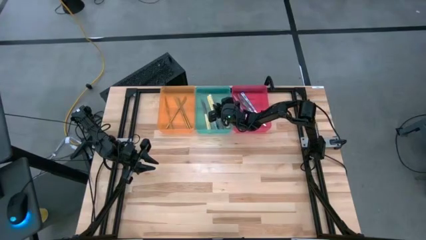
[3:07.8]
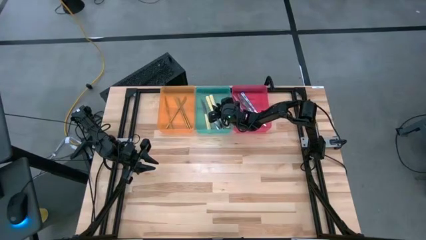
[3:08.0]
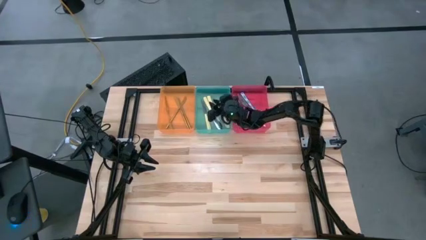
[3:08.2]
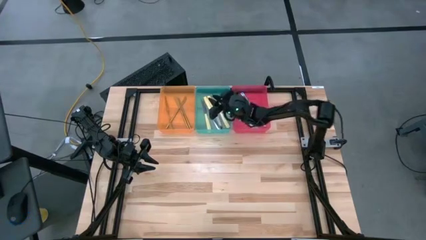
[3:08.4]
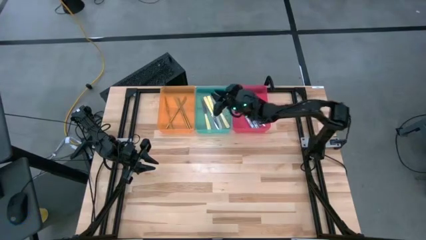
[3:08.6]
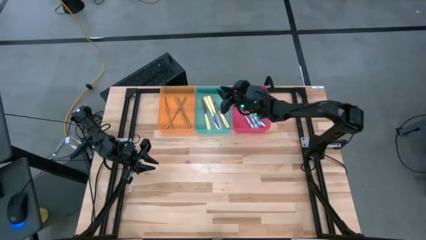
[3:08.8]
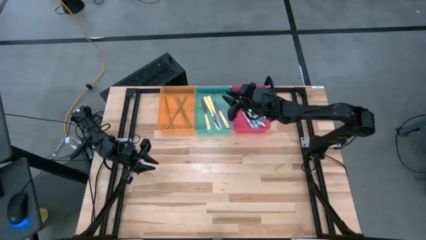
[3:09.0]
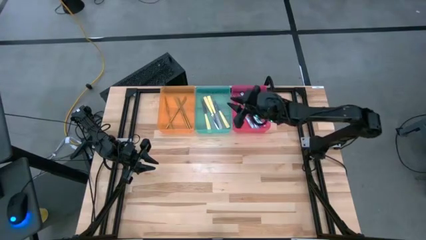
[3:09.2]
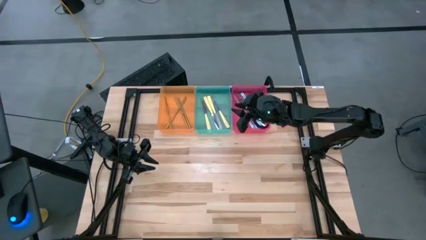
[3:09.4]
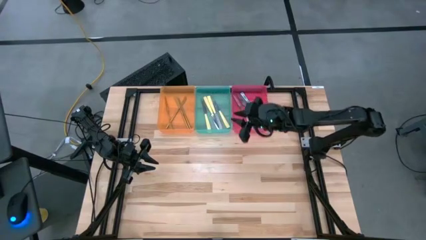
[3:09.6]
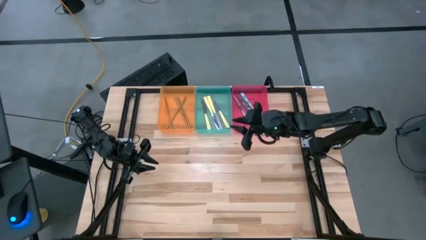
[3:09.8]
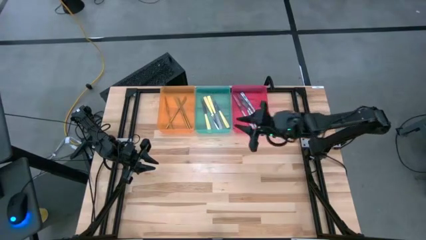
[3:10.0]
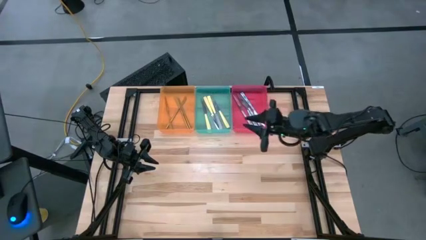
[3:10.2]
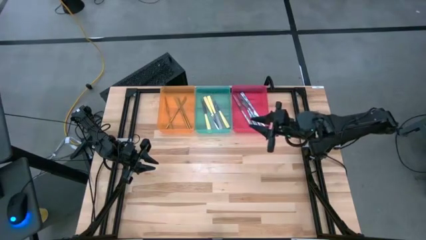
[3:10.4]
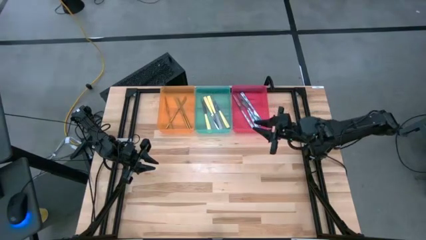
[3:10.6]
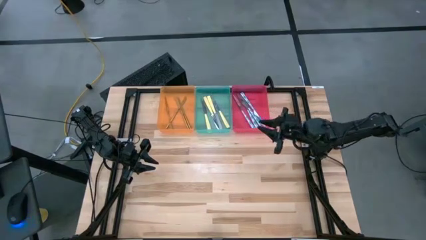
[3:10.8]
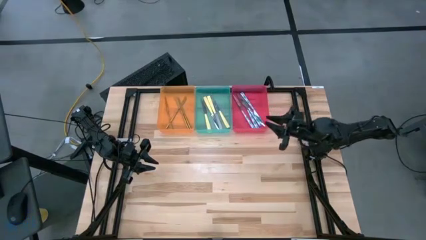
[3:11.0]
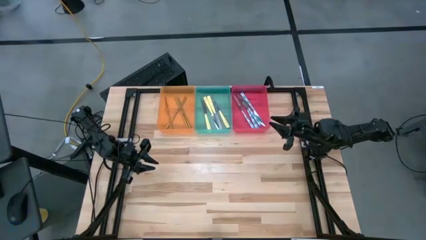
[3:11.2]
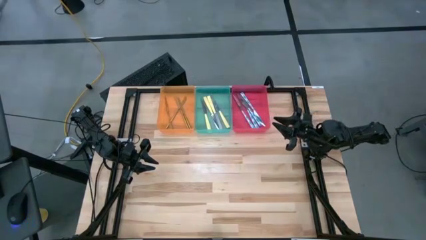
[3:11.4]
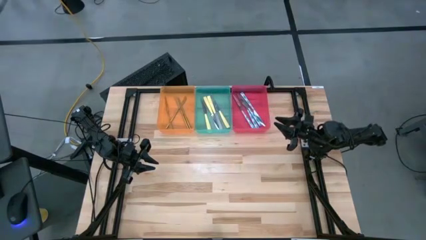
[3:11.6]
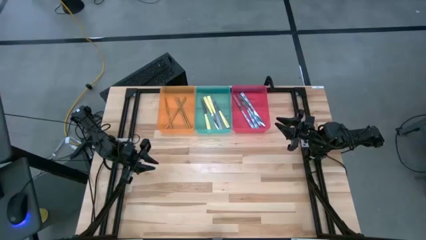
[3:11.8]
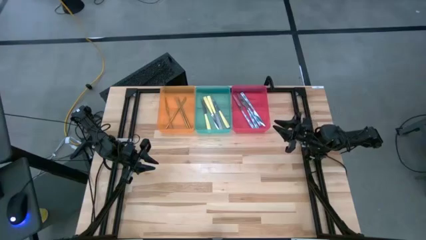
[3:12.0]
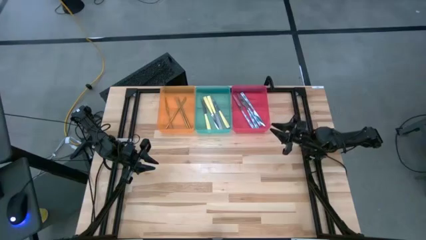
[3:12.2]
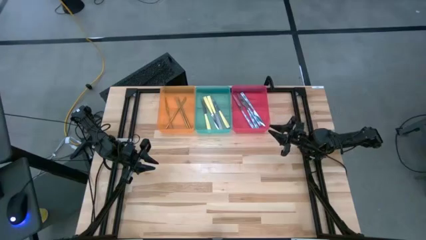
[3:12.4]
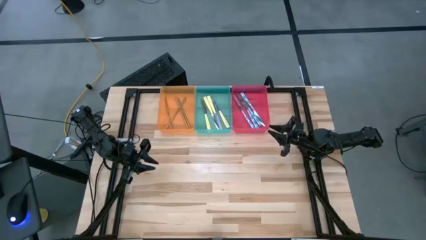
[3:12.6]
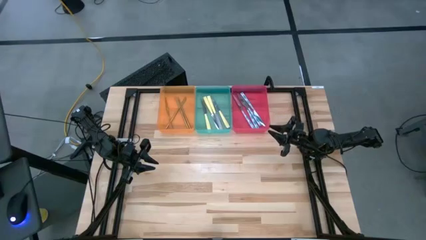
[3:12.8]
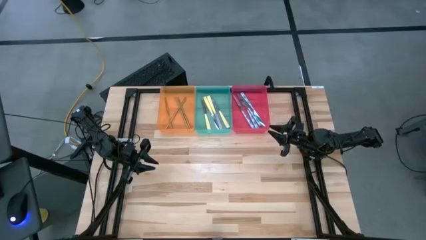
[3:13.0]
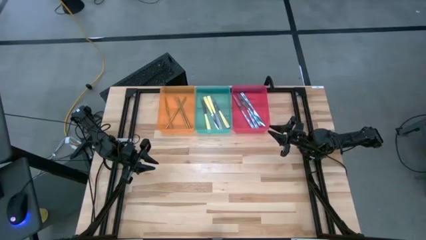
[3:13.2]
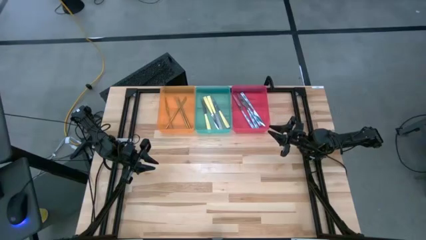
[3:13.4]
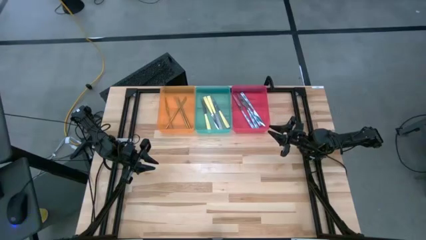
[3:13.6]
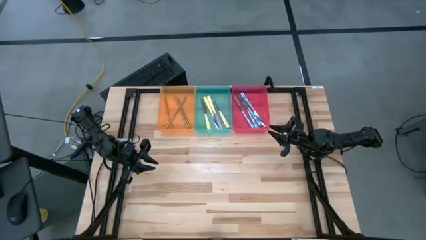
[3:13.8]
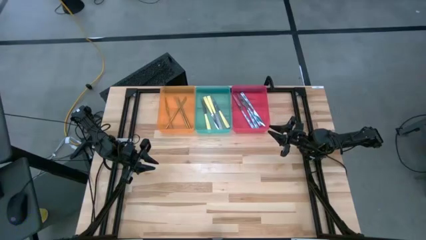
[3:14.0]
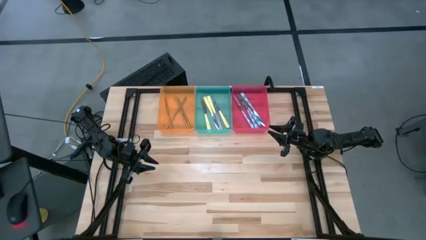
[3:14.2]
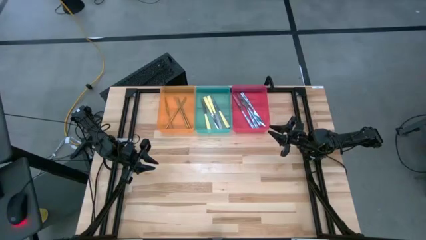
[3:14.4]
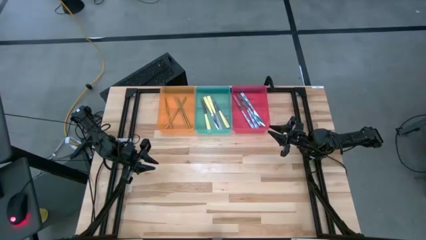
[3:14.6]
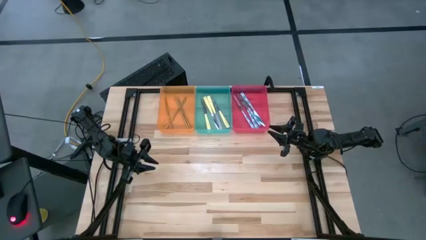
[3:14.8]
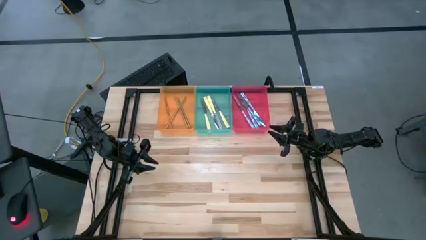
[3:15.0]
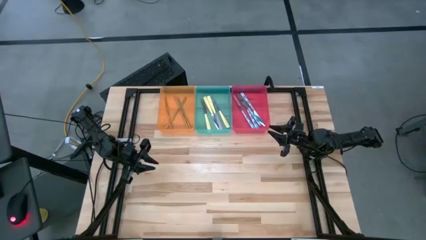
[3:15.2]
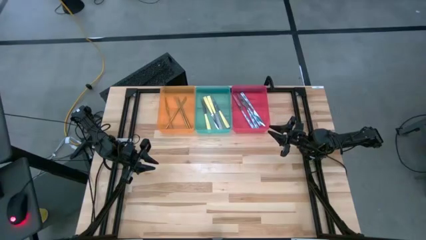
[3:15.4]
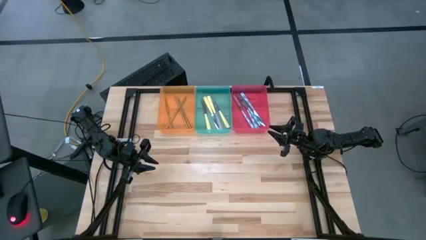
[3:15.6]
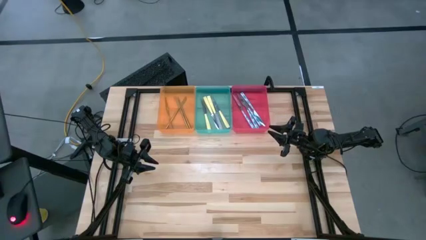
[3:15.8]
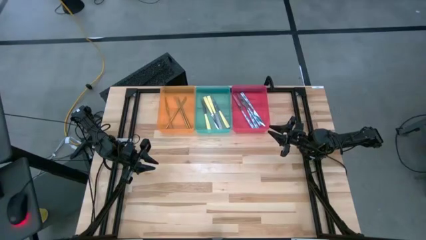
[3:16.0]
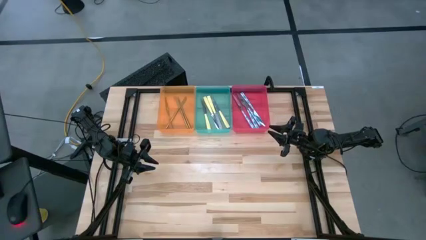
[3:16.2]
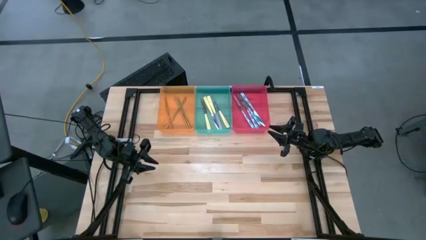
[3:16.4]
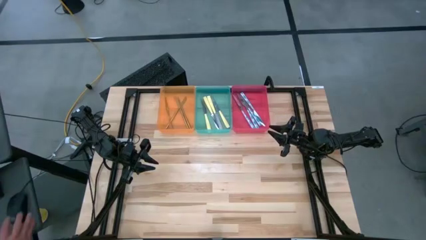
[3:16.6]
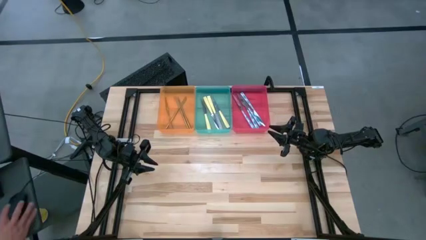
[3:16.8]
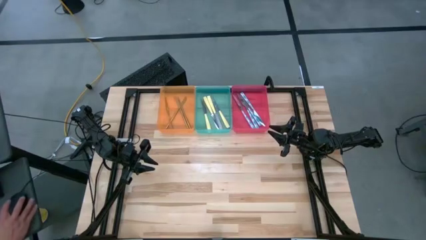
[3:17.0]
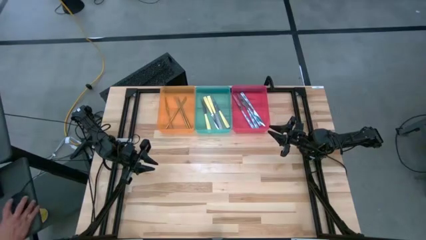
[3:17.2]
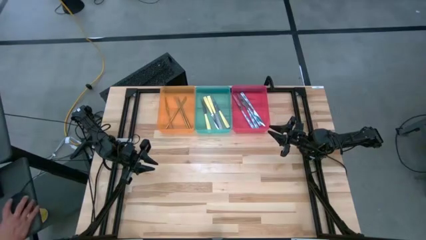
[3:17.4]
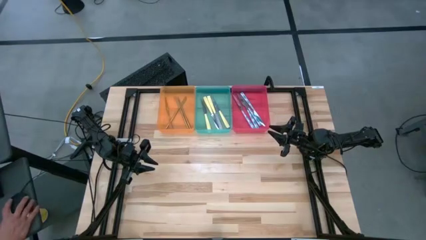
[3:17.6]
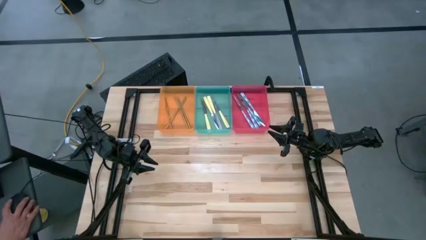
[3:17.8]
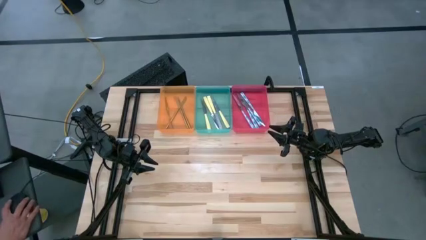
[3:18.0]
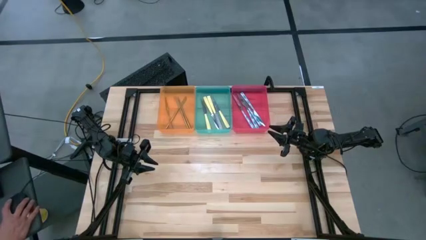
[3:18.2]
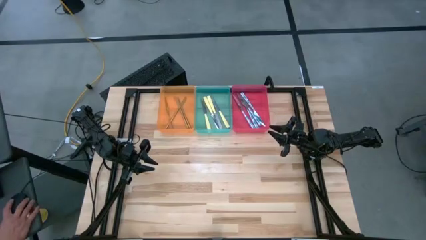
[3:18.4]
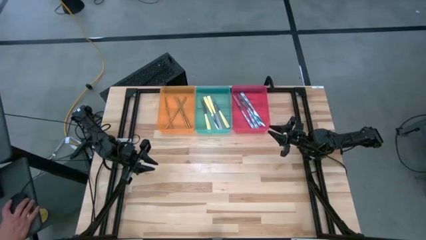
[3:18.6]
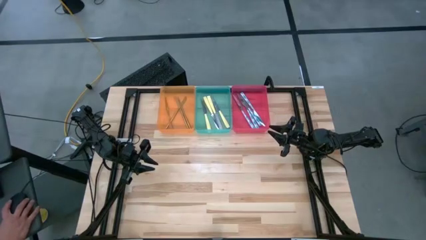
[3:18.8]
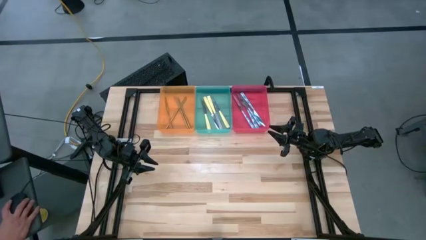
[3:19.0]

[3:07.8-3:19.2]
Task: Sort silverware by color (type)
Return to Home Position

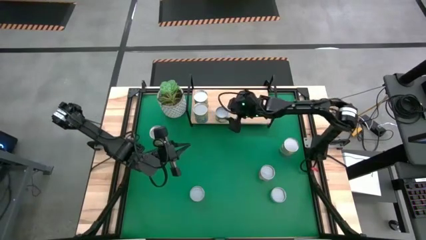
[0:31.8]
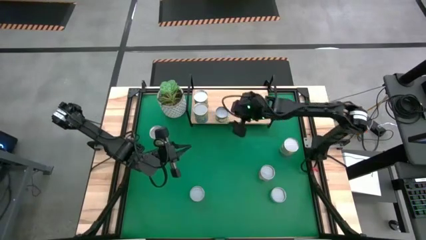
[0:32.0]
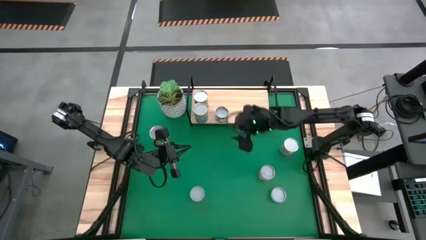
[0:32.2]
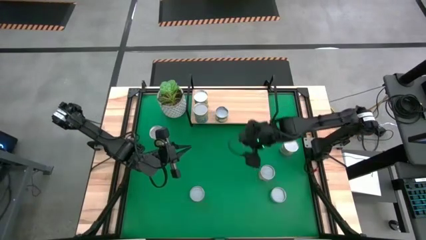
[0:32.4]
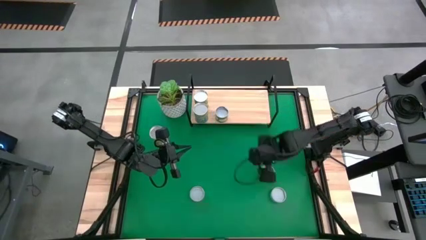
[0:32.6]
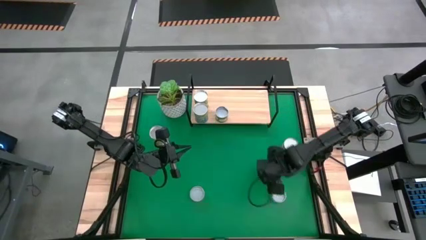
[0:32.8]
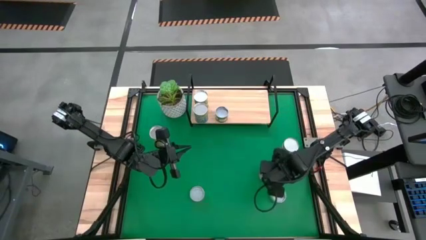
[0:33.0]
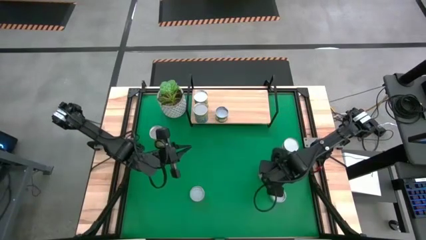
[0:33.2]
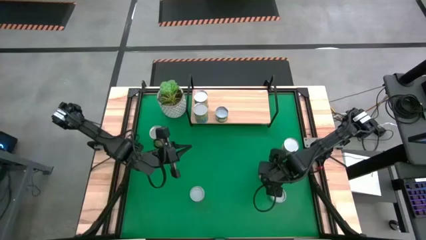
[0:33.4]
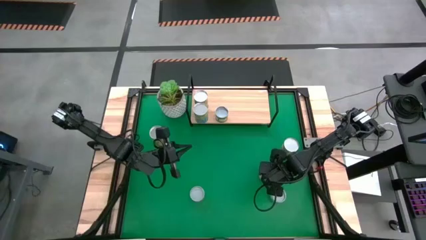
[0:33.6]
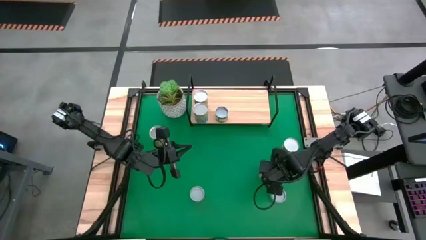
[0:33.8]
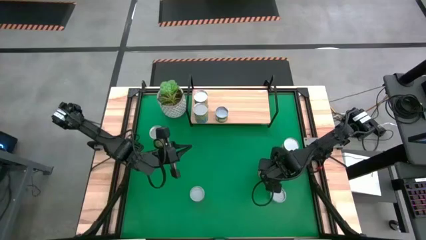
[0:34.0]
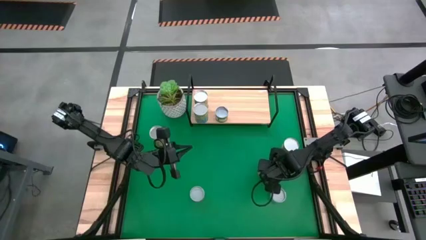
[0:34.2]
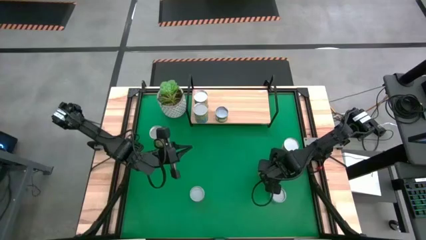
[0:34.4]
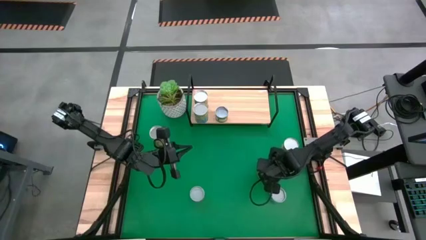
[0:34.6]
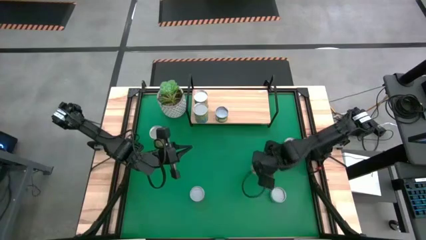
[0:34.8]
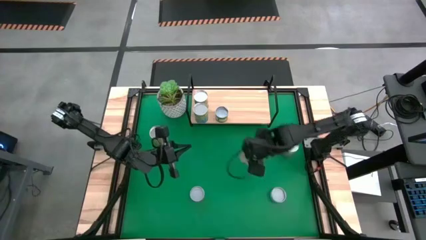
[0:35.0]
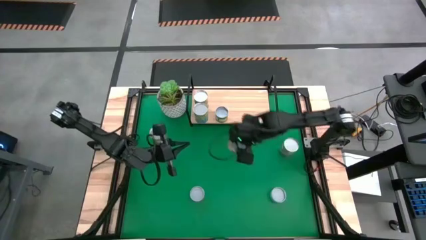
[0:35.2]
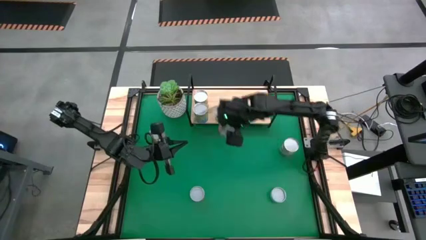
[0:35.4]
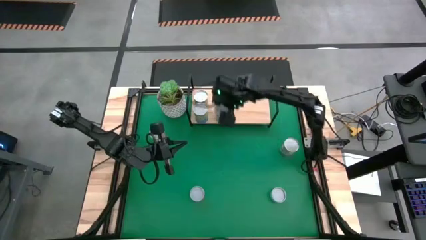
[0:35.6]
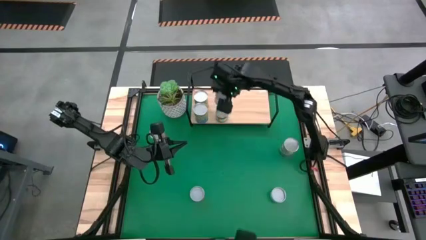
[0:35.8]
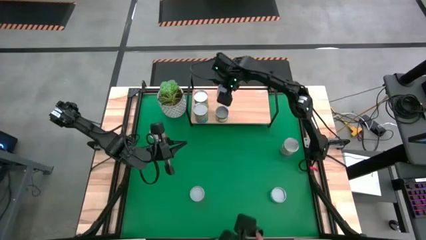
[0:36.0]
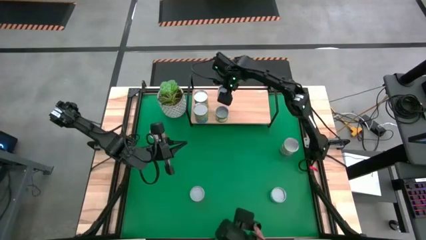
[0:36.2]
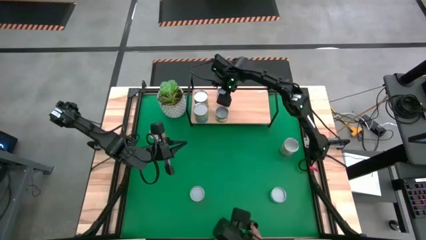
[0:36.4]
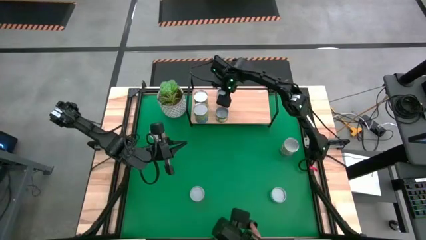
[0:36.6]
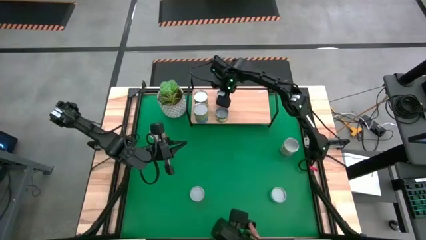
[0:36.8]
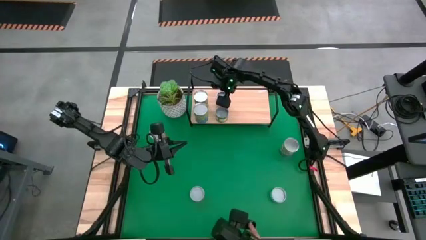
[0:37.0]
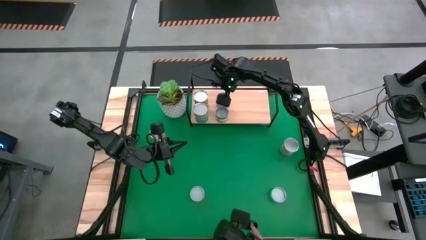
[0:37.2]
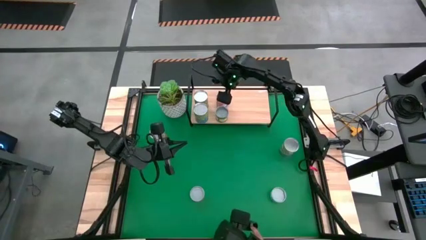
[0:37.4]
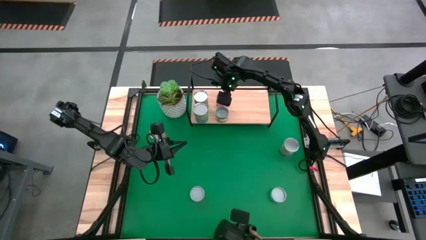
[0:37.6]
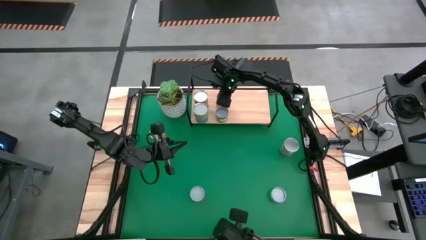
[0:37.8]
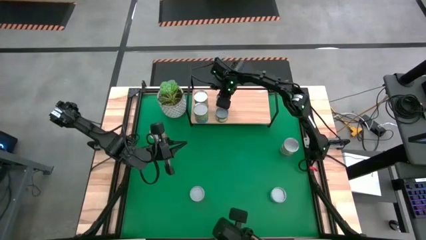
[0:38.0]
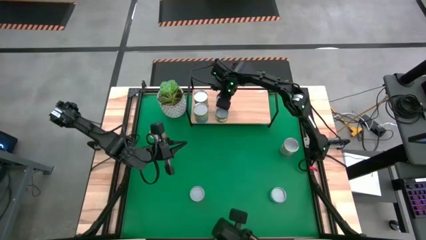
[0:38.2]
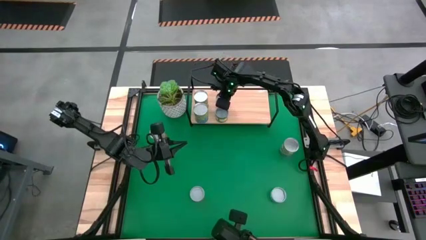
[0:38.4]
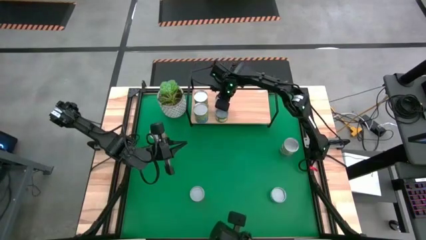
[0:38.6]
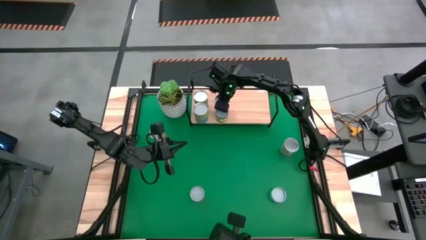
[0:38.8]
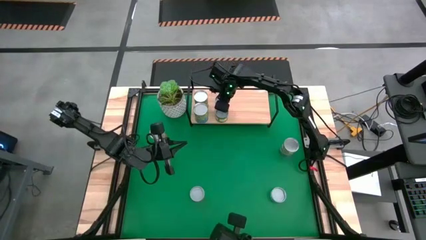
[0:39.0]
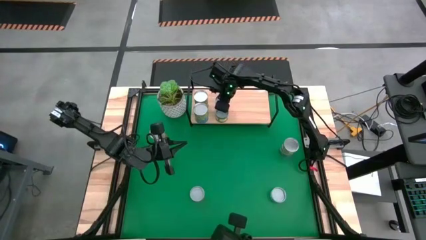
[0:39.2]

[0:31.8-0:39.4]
Task: Pick and place cans onto a shelf
Put the canned tomatoes on the shelf
